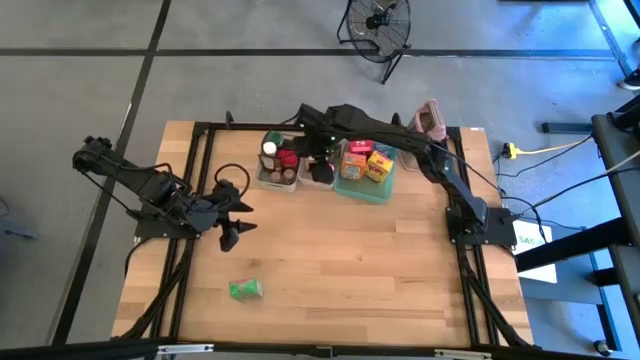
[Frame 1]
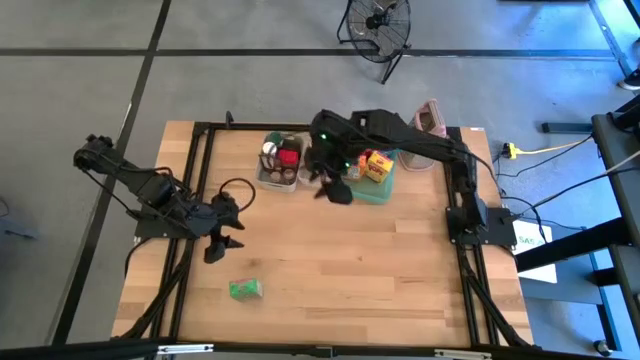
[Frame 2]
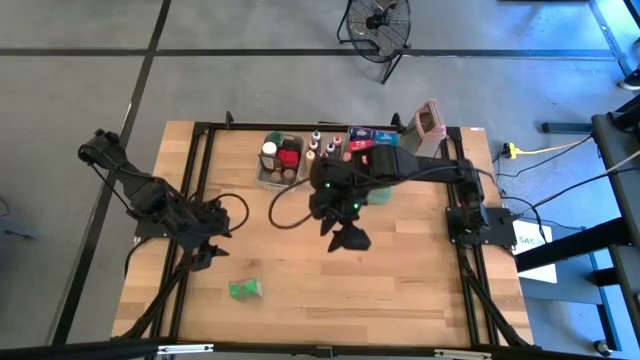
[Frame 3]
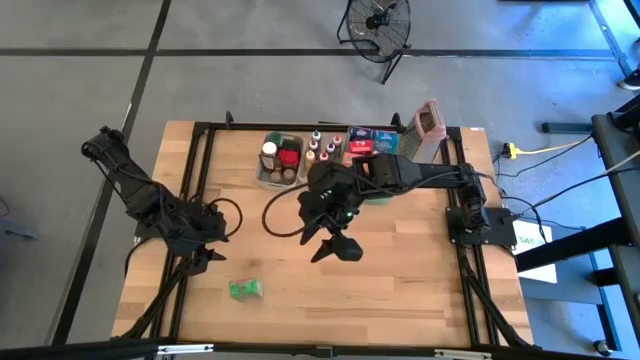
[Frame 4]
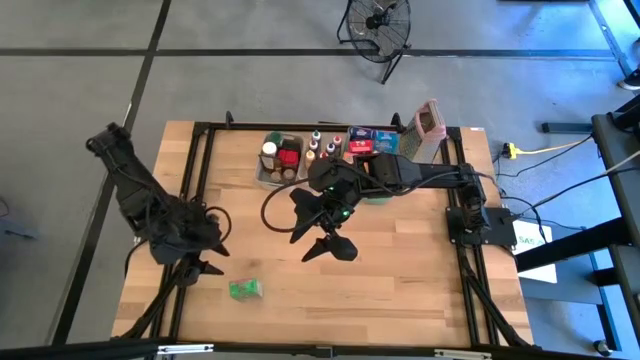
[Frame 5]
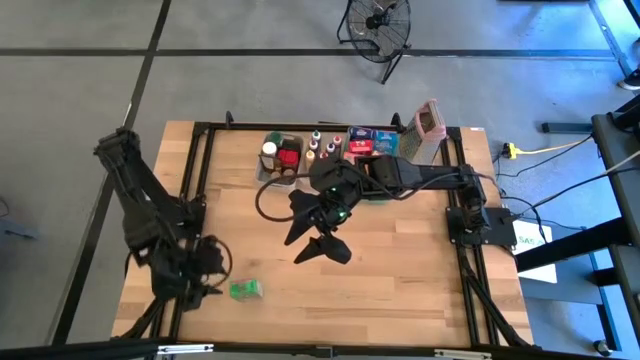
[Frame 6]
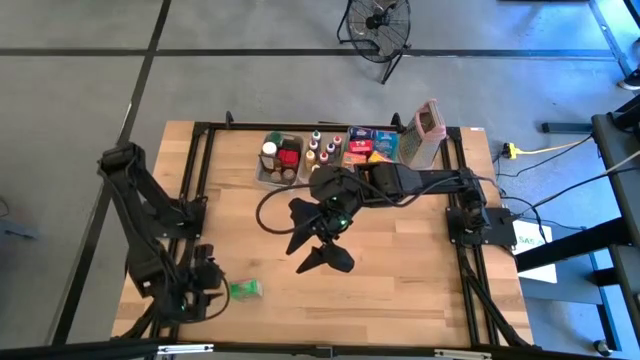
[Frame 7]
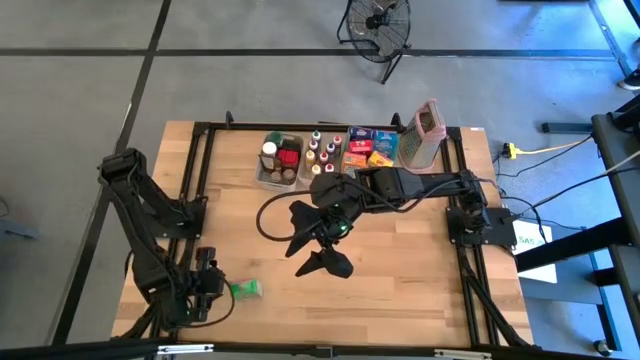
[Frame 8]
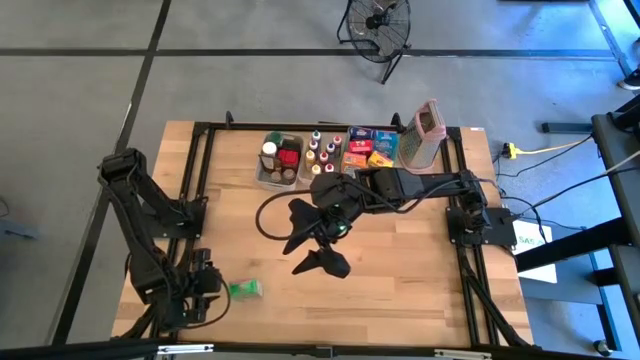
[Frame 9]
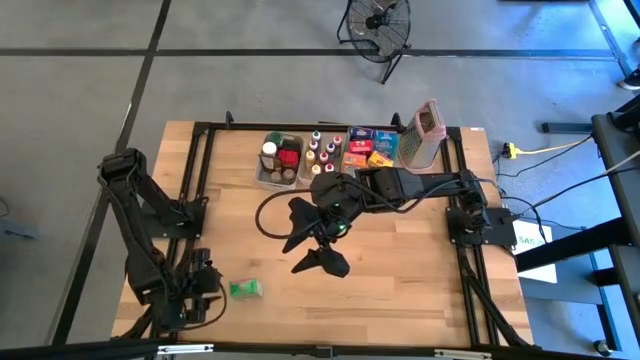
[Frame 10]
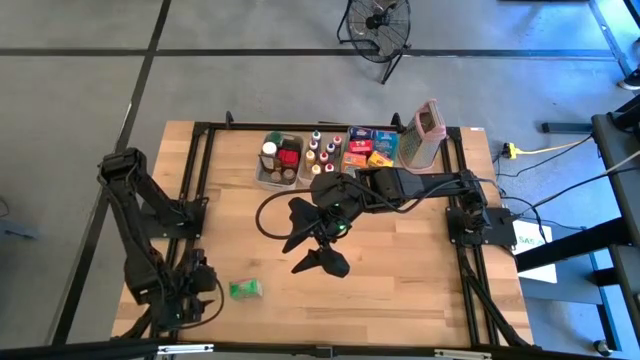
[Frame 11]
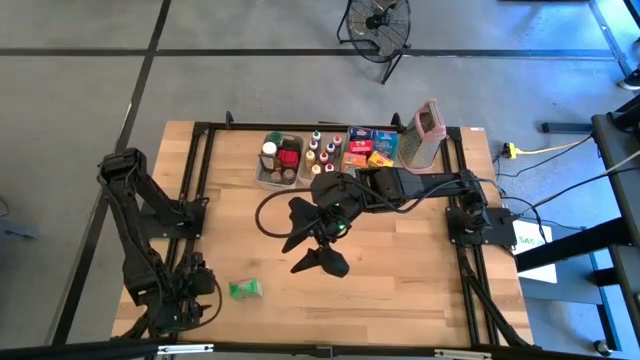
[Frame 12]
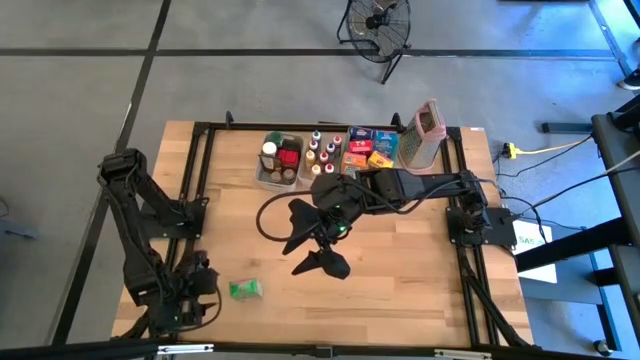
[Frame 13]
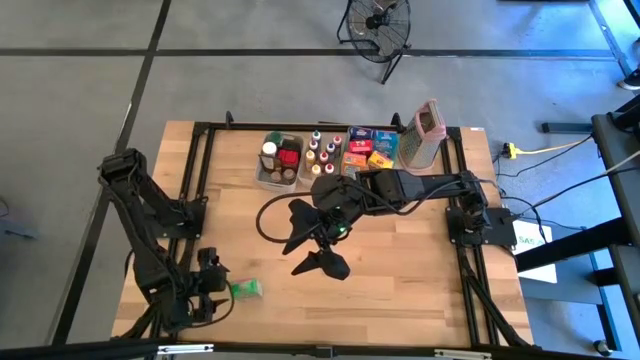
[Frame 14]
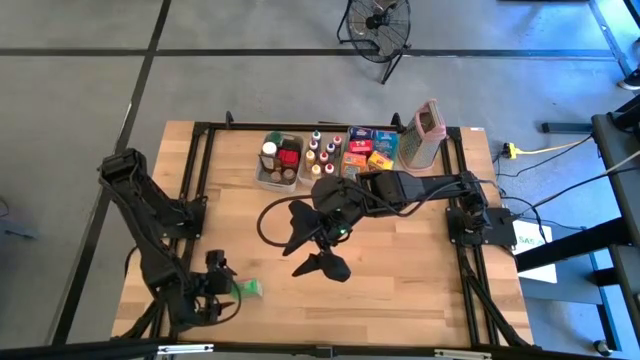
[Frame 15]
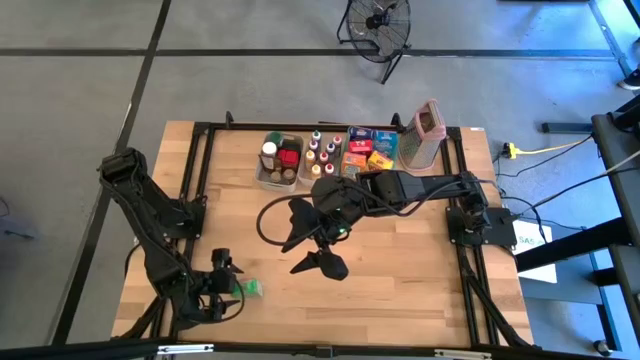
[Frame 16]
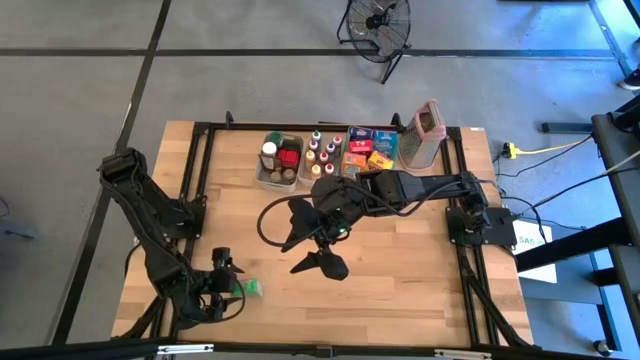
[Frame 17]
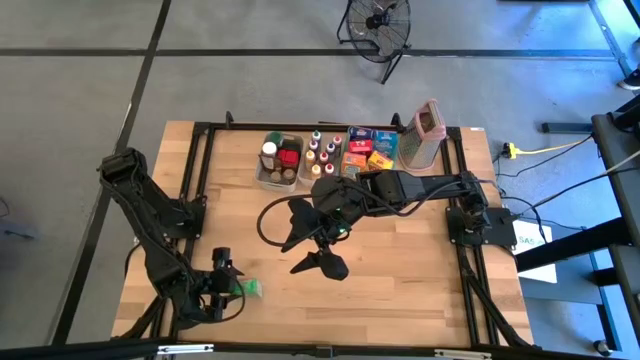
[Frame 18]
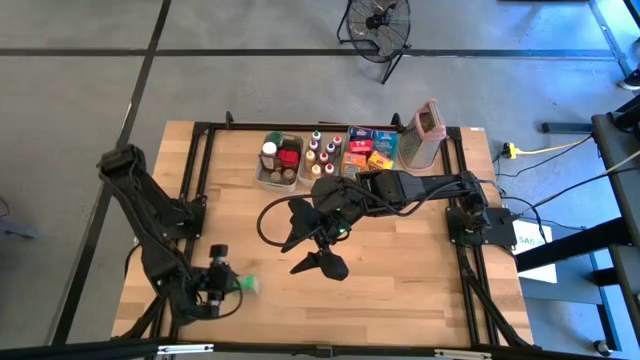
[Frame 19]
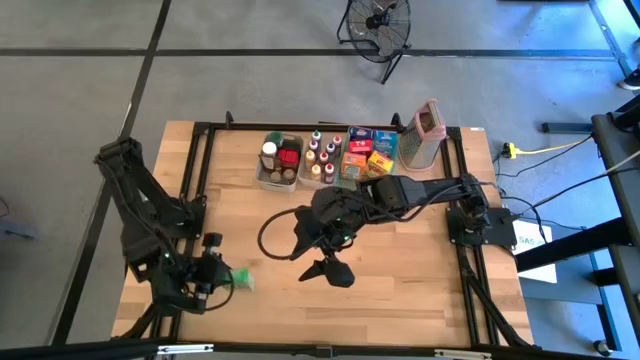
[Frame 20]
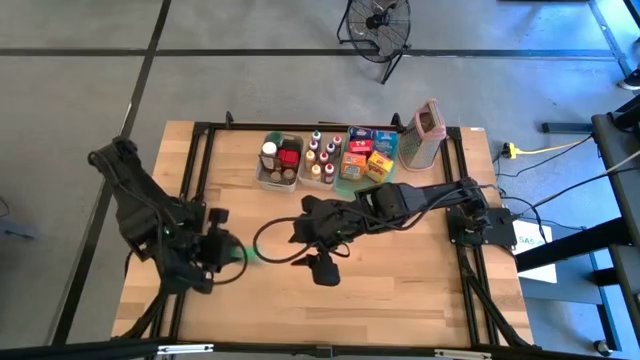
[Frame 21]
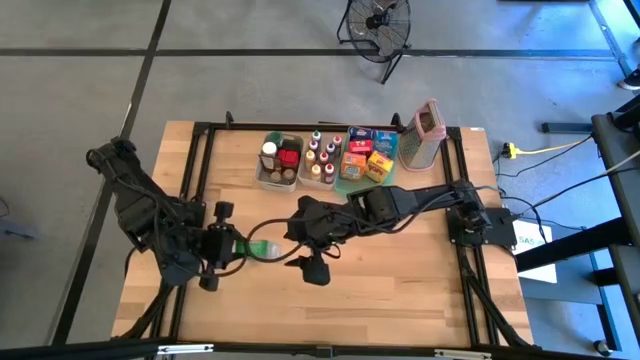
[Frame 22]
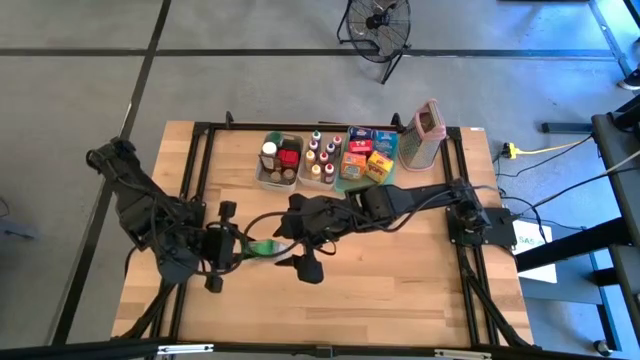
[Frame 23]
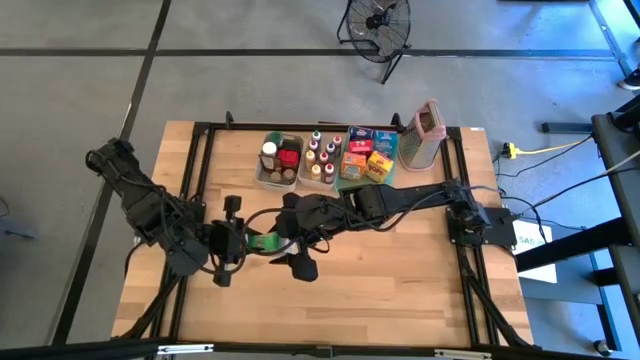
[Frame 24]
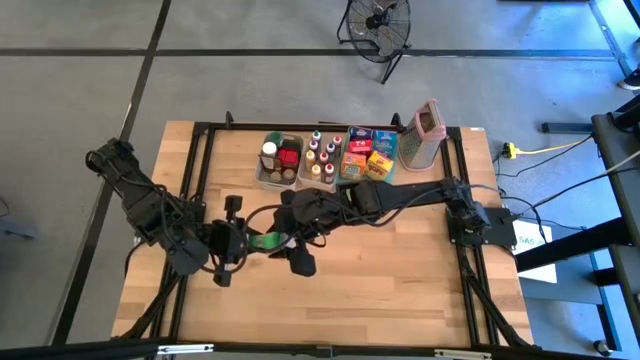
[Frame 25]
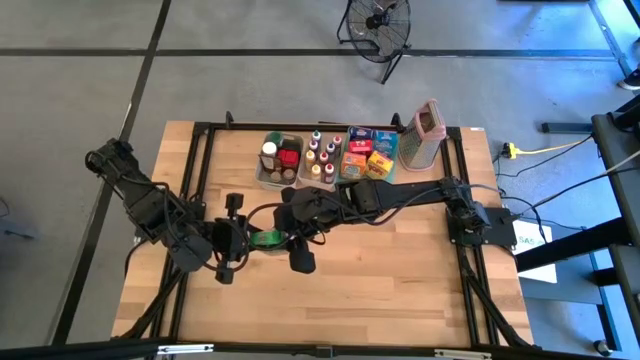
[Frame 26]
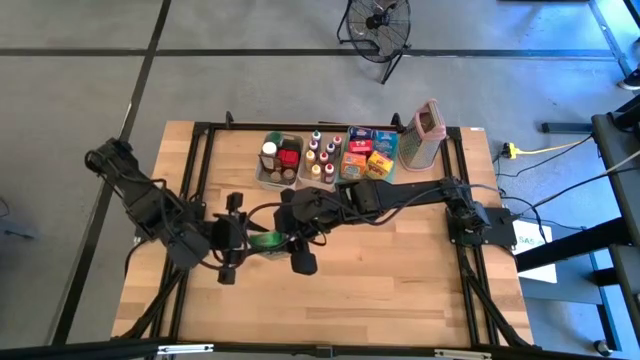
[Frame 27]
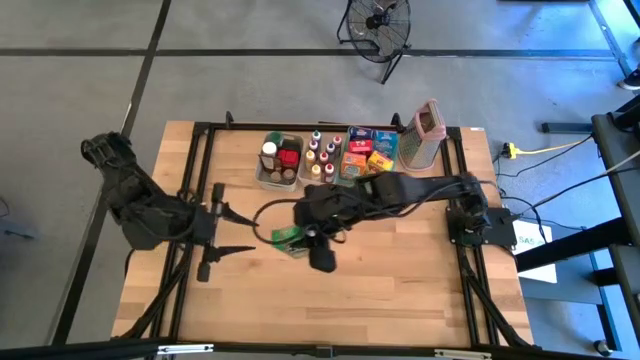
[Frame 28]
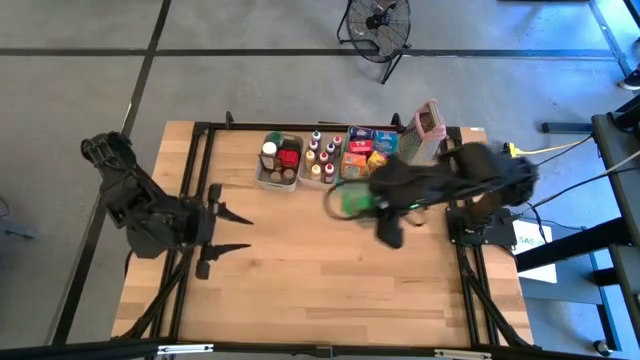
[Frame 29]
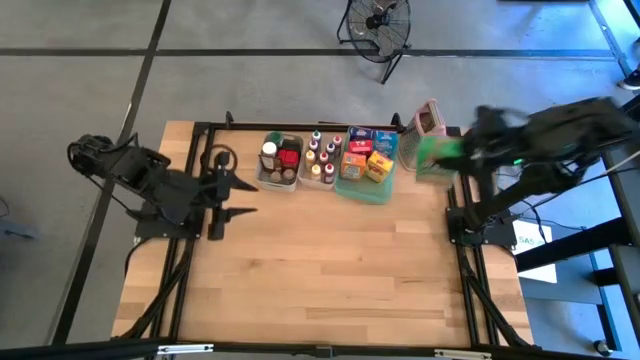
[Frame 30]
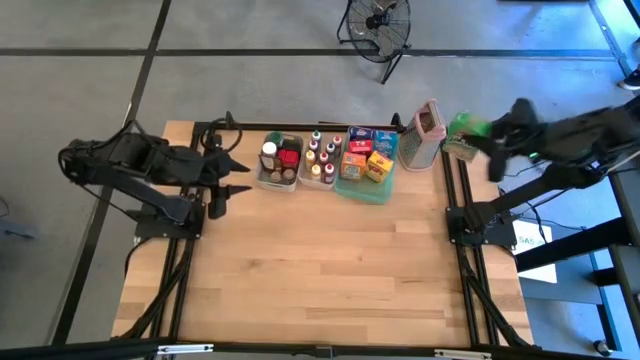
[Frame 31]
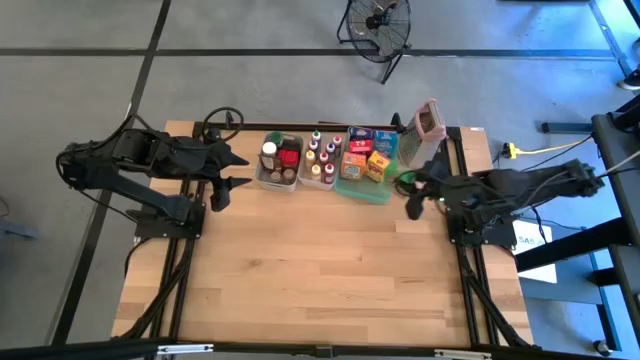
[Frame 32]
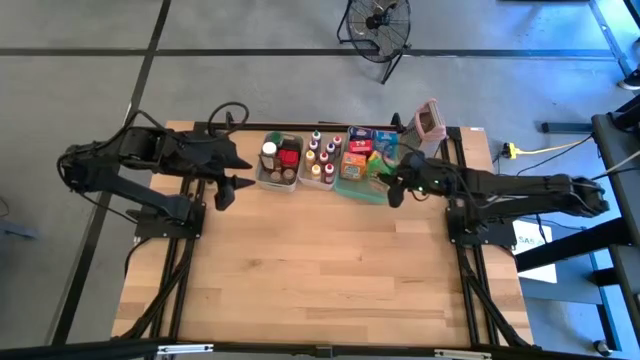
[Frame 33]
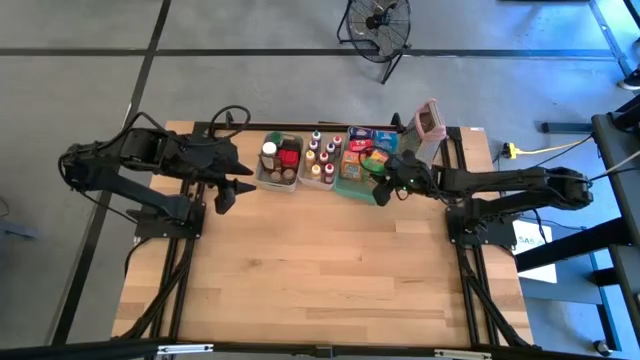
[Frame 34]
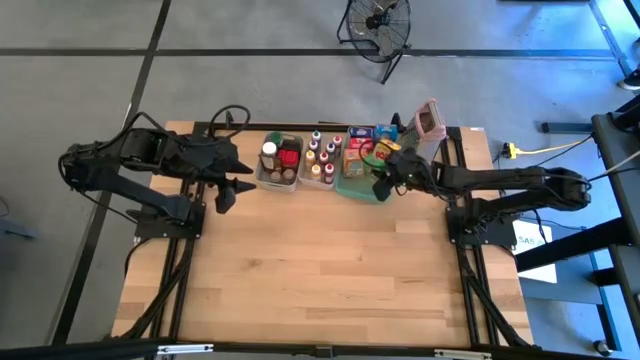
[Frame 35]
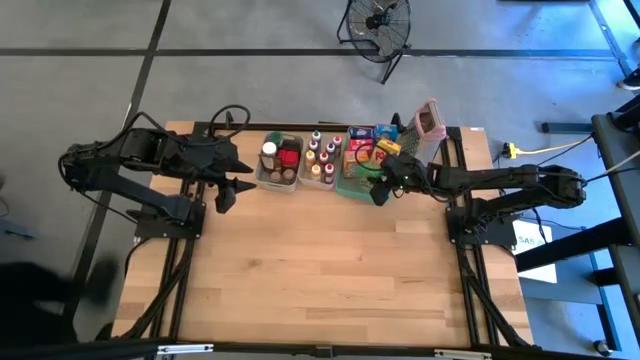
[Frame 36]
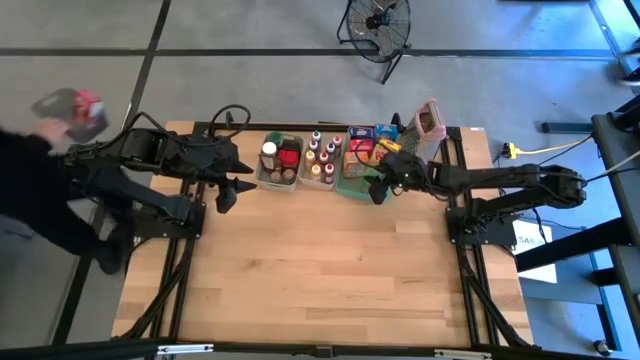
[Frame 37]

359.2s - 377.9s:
Task: Pick & Place Kitchen Items
Put the green cereal box into the green bin

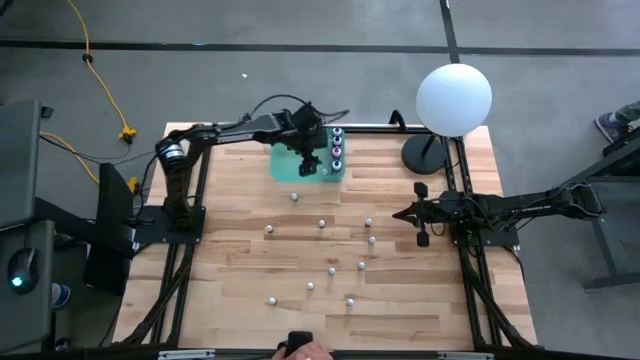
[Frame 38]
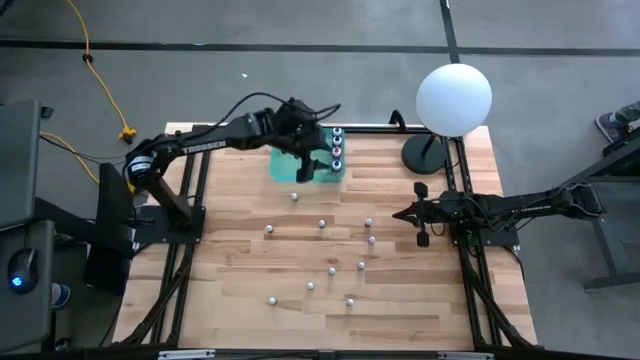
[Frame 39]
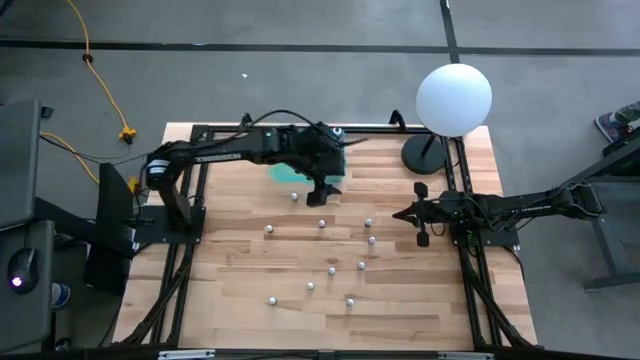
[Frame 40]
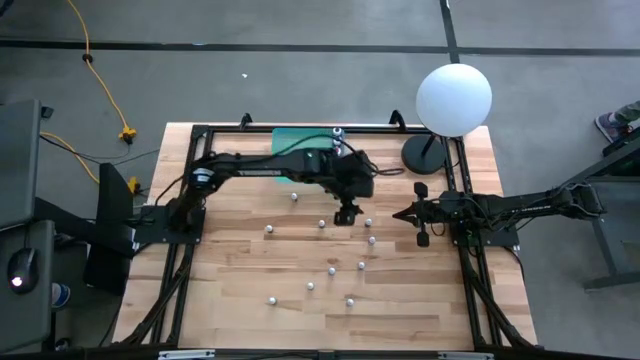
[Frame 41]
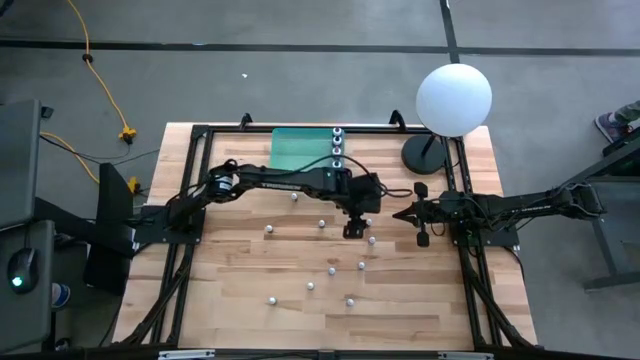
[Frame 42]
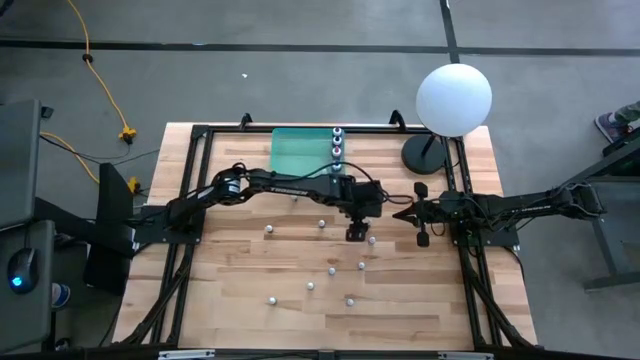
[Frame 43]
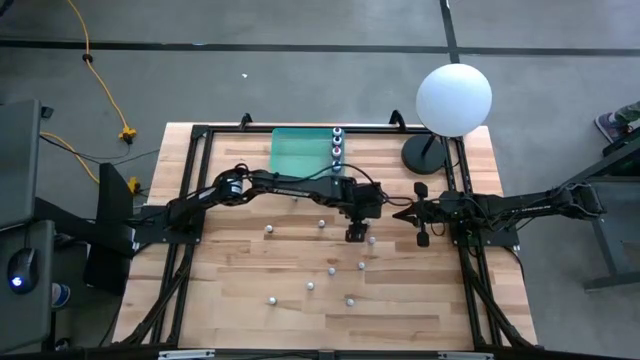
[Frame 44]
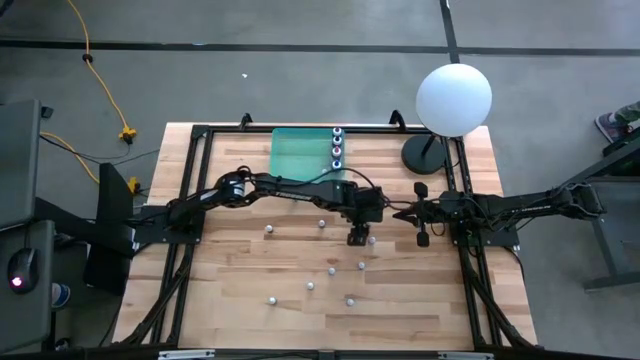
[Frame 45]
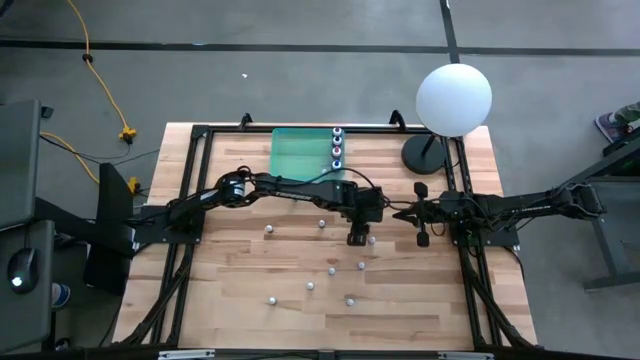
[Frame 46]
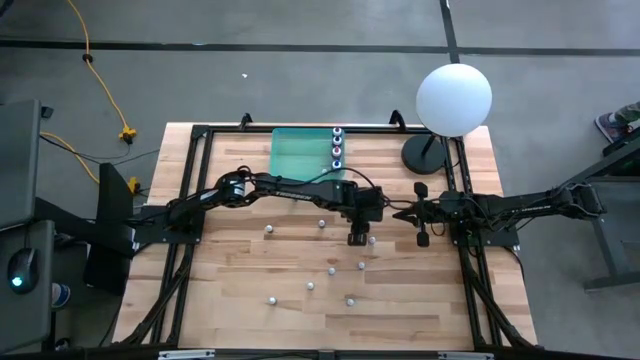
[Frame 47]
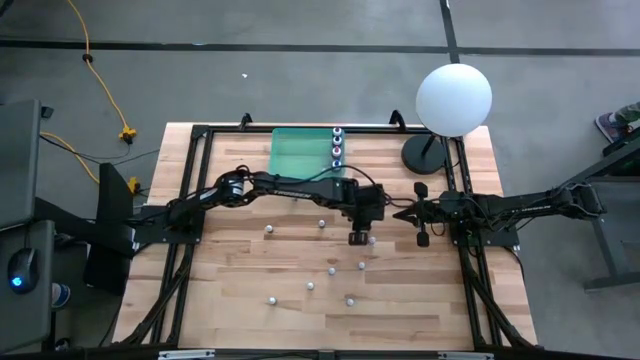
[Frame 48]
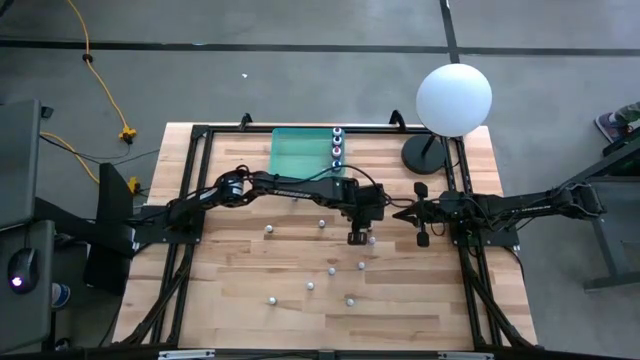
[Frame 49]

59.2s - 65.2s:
Task: Pick & Place food coloring
Put the small black food coloring bottle into the blue transparent bin
